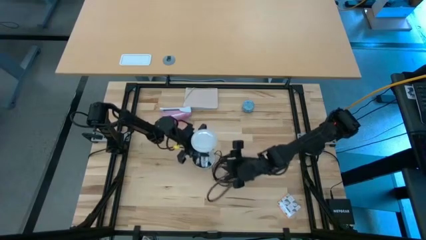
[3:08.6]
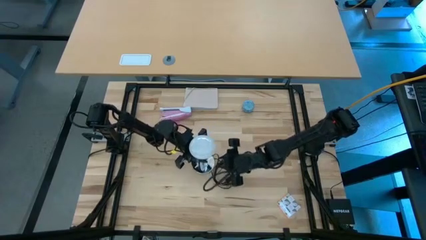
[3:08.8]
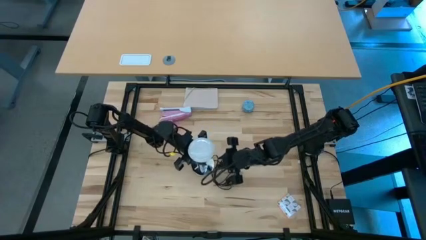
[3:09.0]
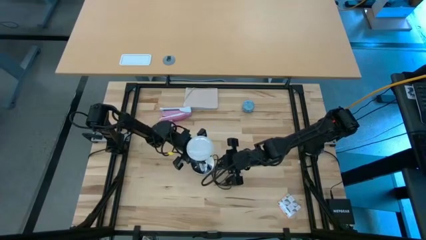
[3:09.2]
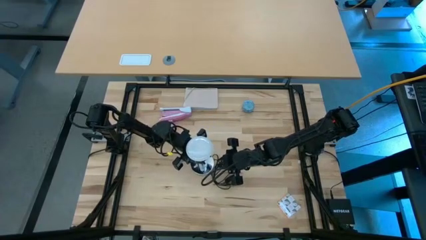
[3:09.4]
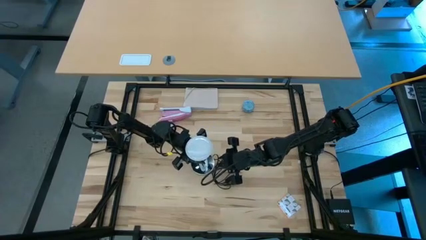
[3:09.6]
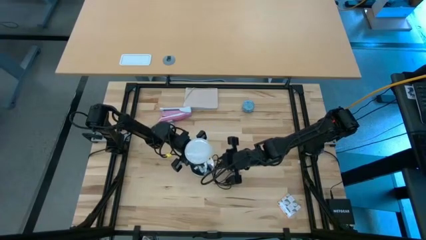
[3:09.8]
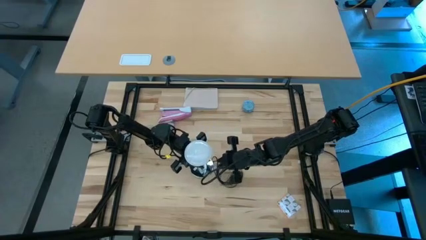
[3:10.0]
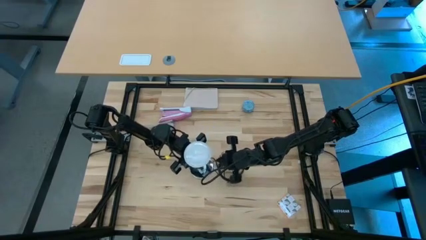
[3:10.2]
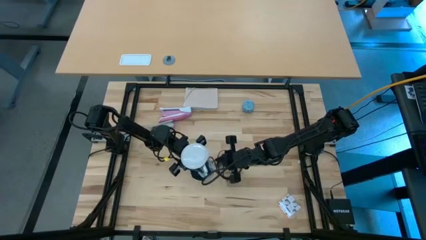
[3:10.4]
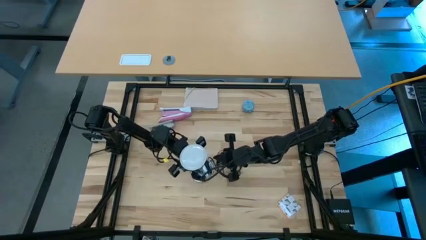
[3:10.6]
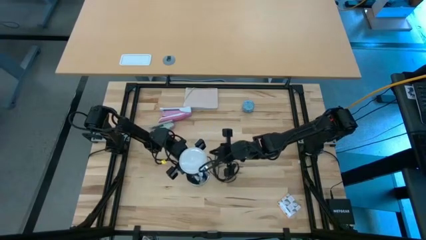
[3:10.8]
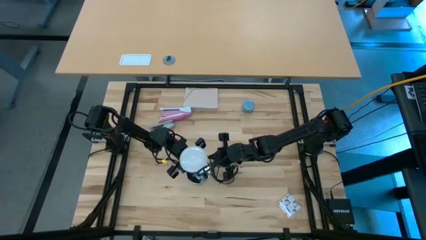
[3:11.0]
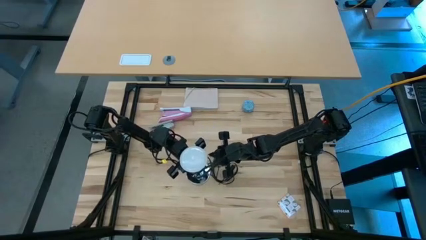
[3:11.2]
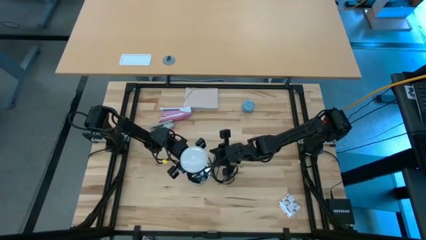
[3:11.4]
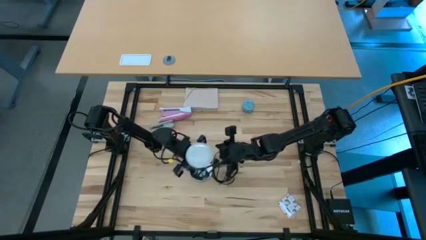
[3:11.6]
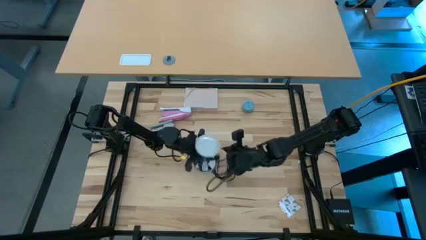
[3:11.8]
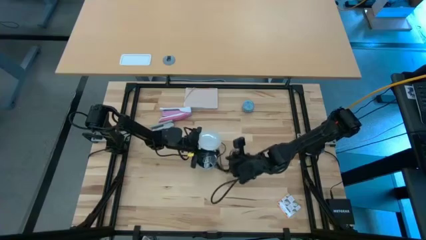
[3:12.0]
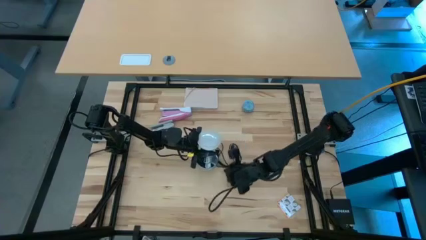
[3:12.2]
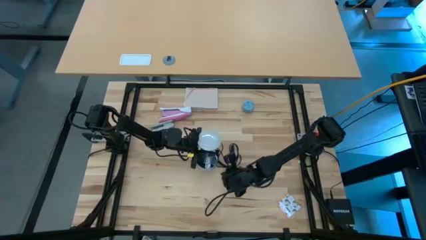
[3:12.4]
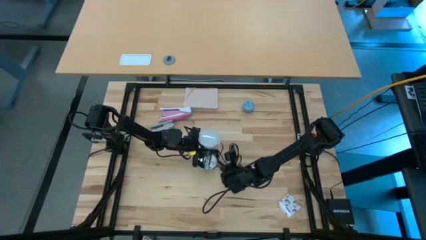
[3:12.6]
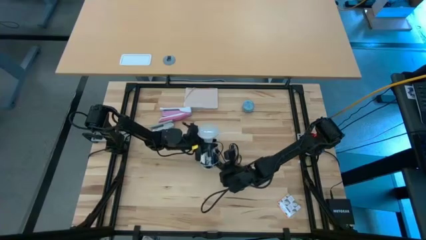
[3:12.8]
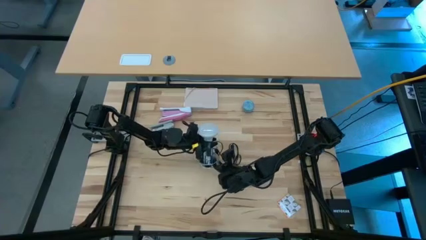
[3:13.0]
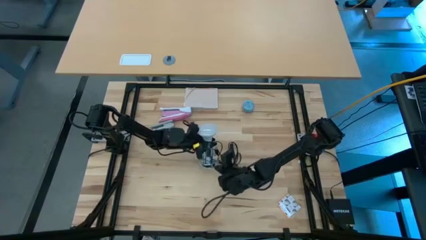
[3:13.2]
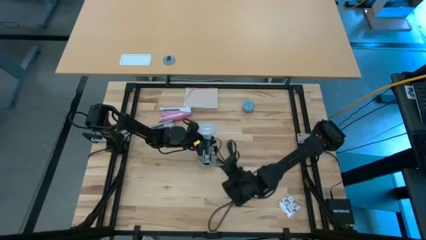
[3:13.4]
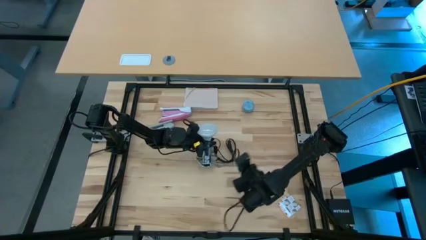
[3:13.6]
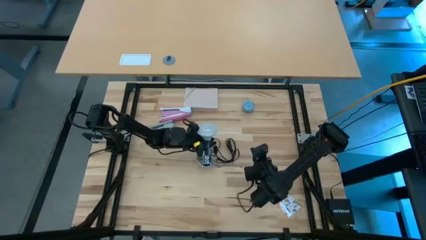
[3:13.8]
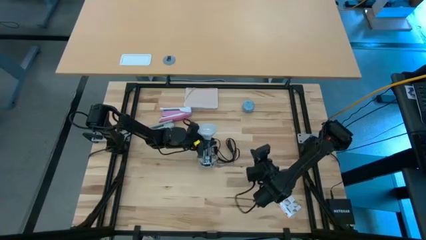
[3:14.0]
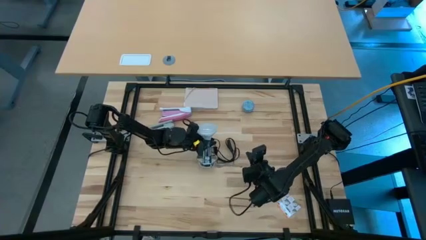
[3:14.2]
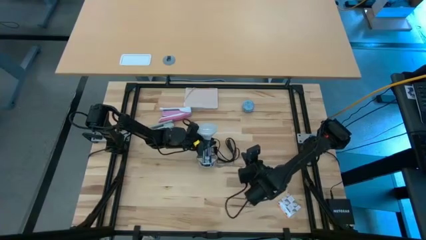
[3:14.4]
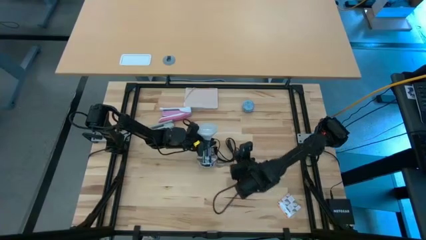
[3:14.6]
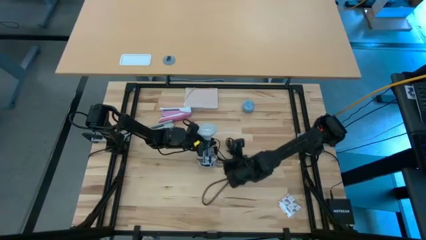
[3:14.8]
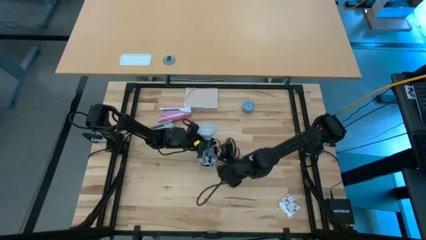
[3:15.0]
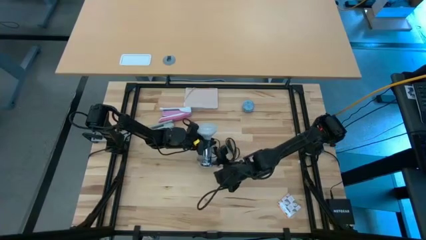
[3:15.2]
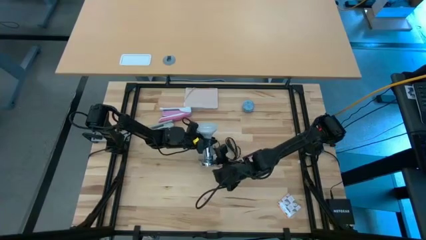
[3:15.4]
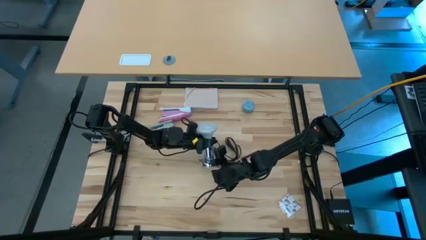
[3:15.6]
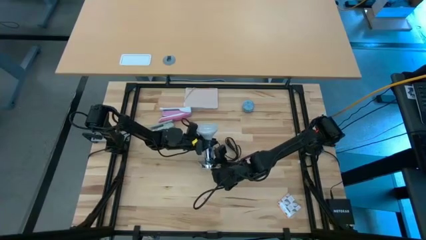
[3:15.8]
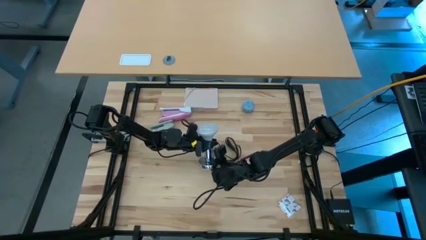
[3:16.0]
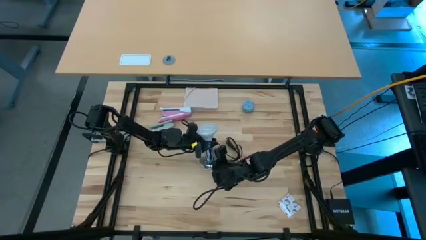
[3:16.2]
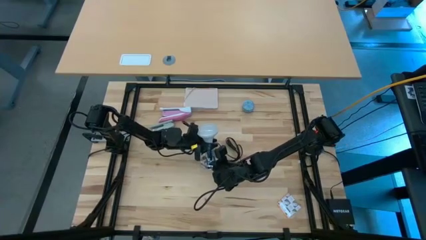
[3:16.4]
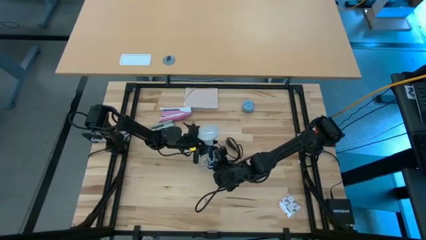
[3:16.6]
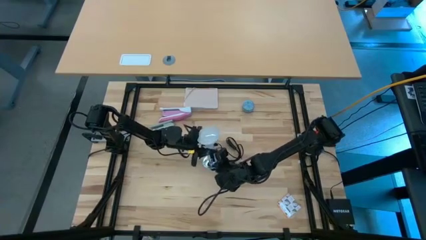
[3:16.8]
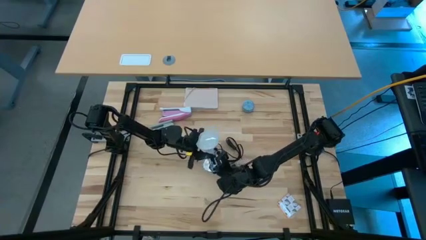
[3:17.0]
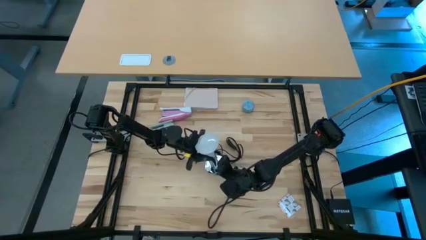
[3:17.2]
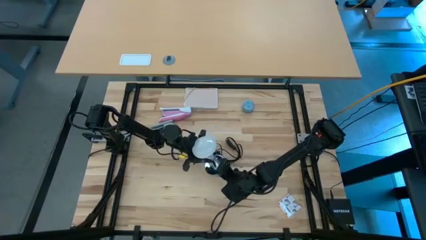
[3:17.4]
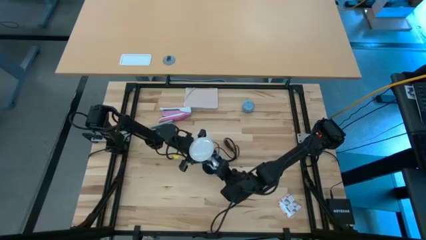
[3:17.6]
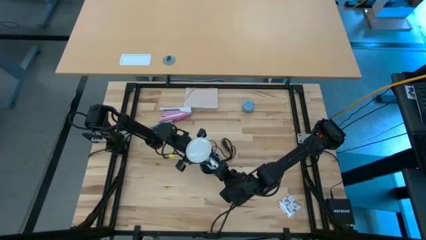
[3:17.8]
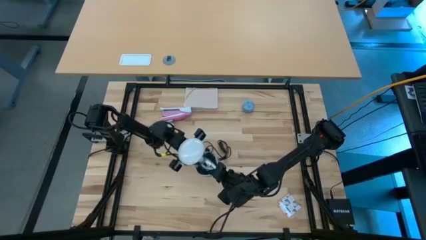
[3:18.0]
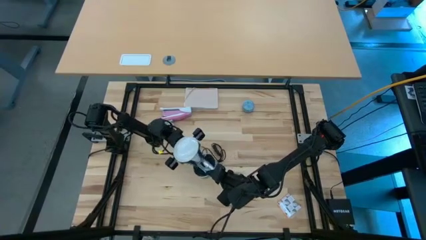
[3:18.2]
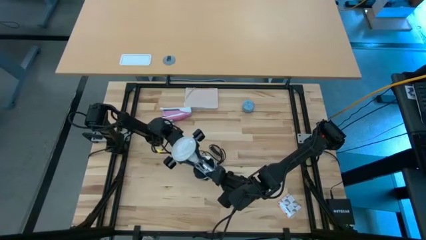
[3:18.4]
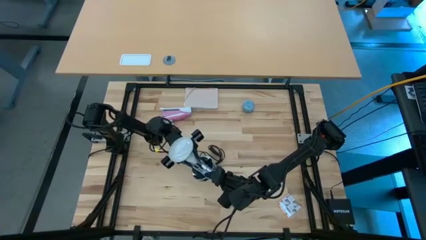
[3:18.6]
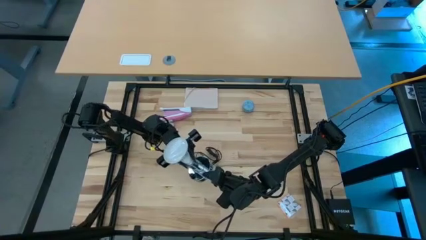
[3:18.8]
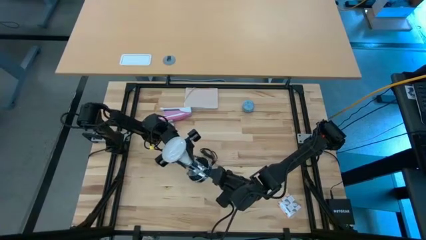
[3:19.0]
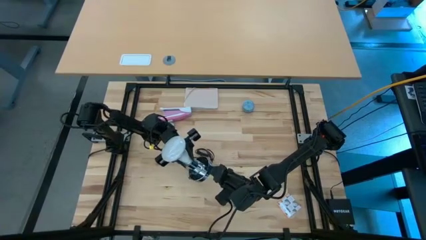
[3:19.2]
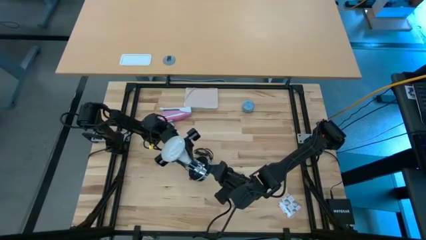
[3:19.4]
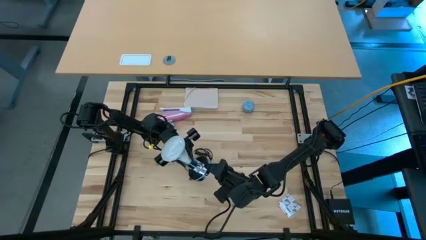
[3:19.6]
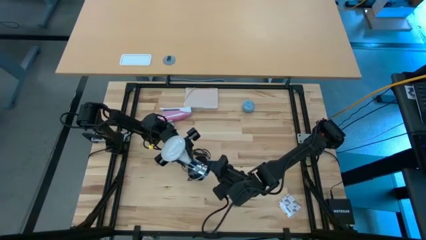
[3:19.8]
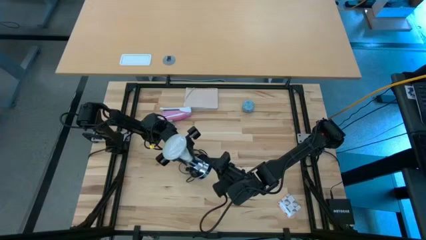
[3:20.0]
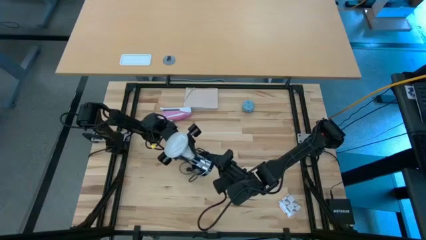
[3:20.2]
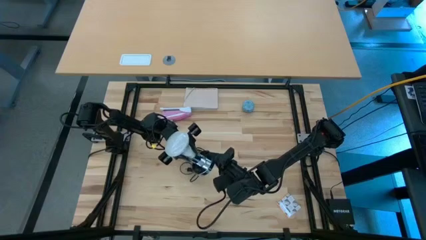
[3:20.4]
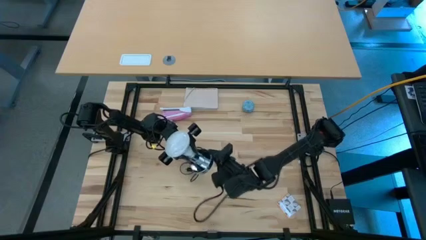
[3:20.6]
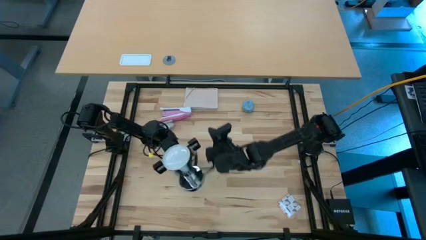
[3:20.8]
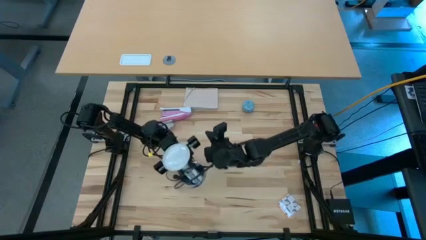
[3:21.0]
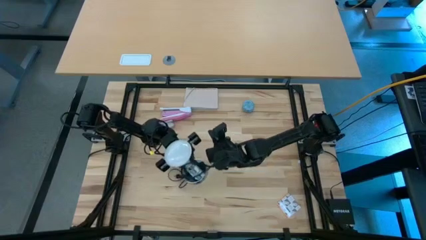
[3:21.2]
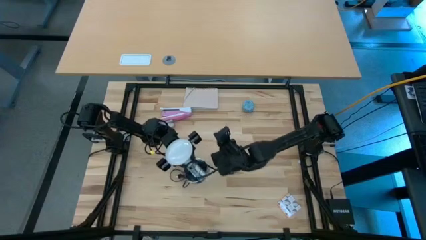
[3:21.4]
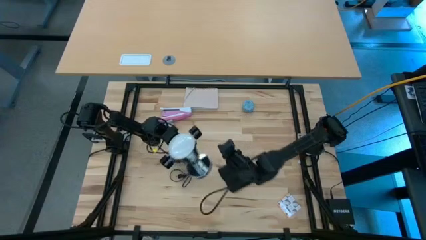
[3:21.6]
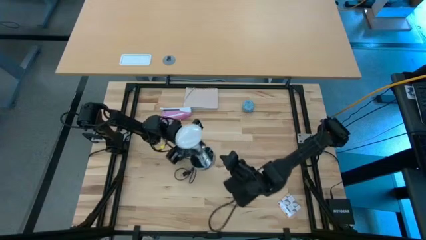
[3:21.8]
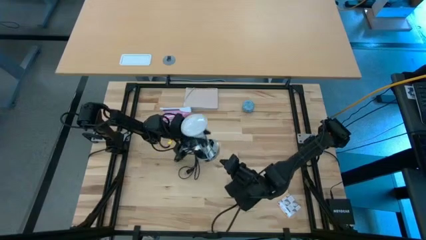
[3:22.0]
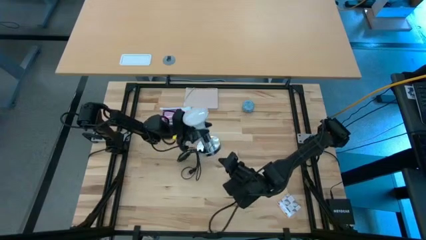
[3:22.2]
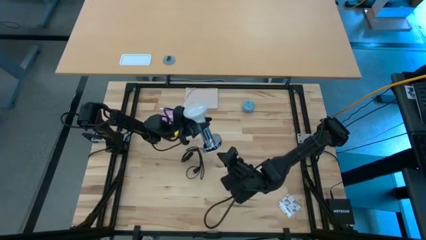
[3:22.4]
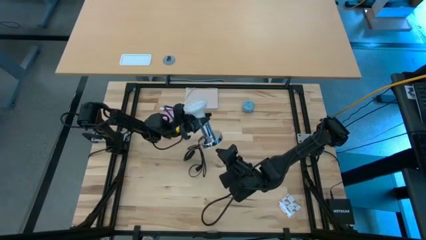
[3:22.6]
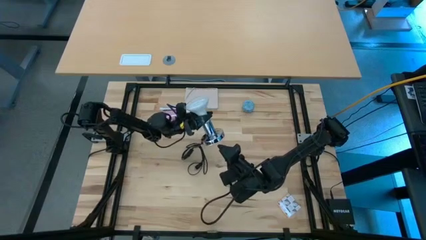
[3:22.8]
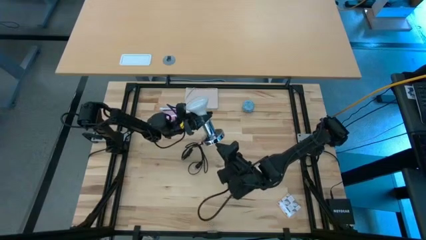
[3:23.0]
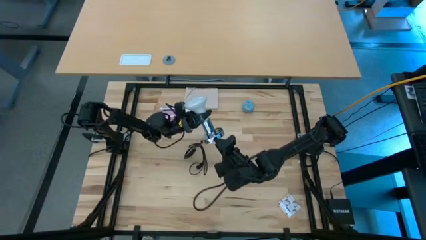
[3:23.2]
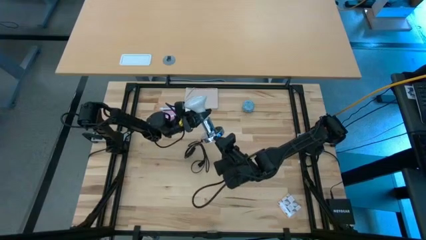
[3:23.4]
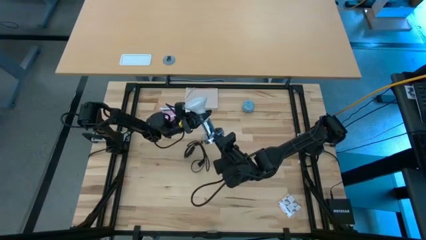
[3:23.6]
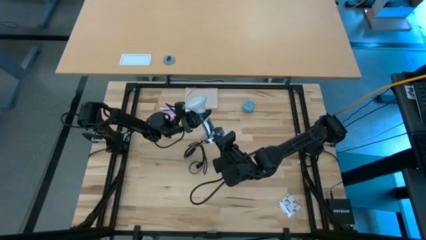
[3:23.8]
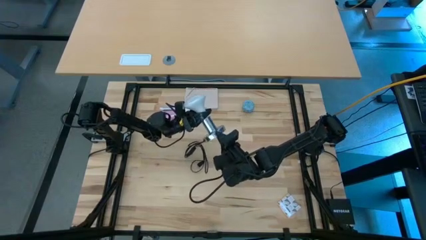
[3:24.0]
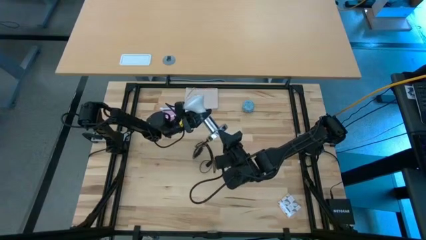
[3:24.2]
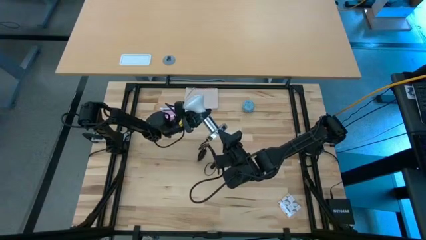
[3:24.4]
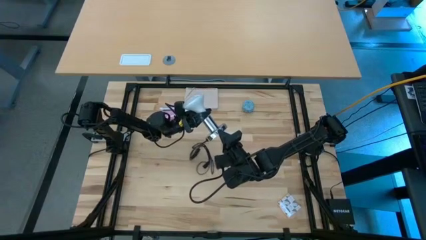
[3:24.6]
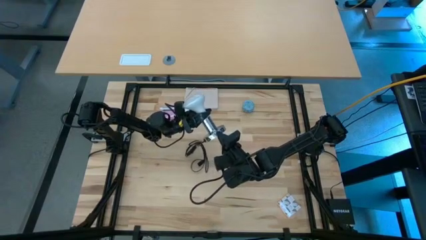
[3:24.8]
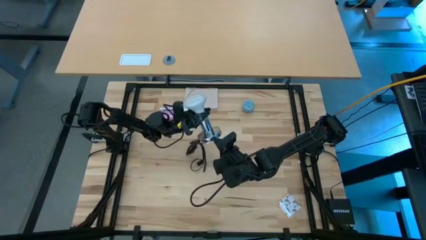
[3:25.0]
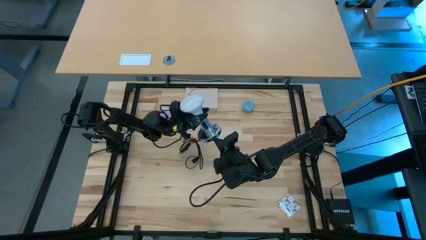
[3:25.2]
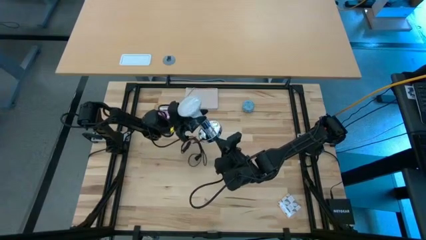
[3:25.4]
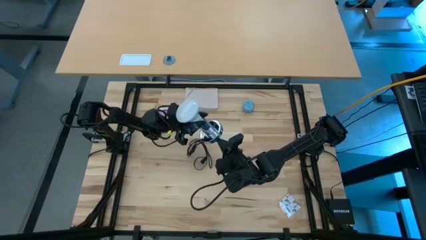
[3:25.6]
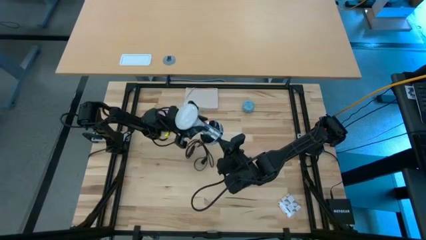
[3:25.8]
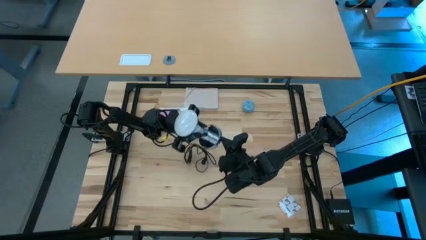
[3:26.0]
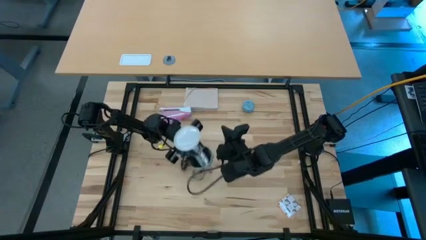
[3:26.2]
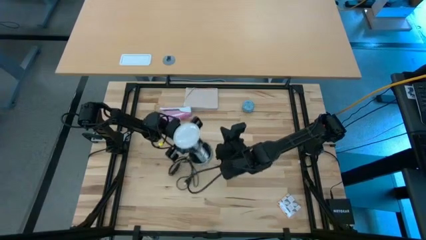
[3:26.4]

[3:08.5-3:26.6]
Task: Screw lightbulb
Insert the white lightbulb into the desk lamp
